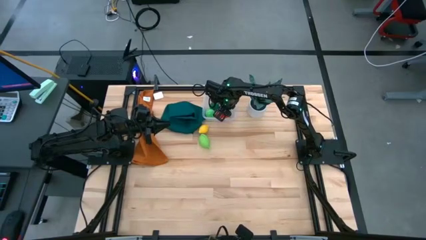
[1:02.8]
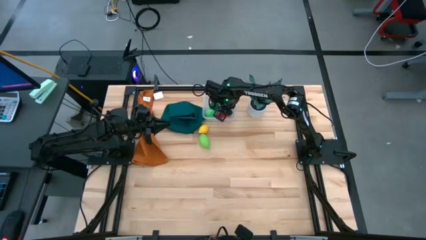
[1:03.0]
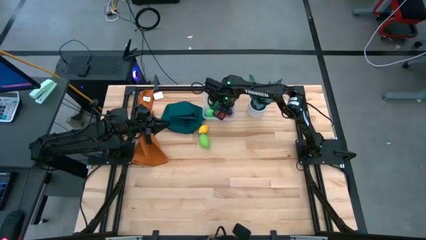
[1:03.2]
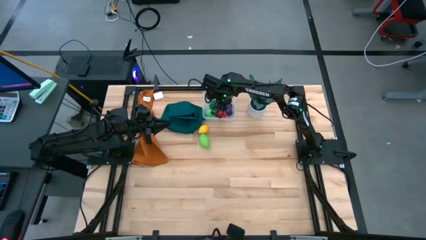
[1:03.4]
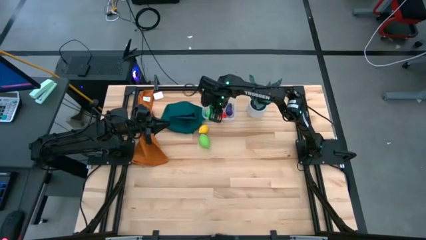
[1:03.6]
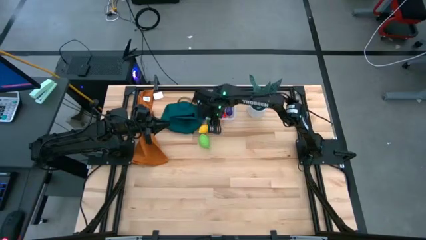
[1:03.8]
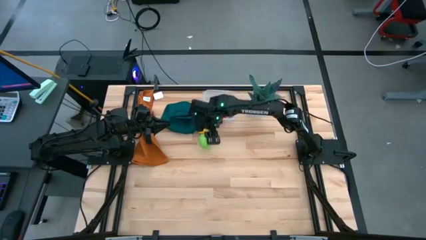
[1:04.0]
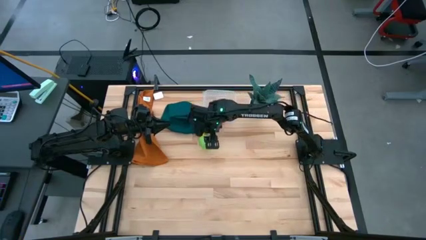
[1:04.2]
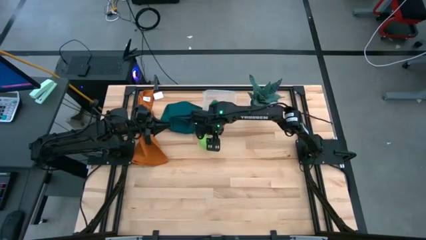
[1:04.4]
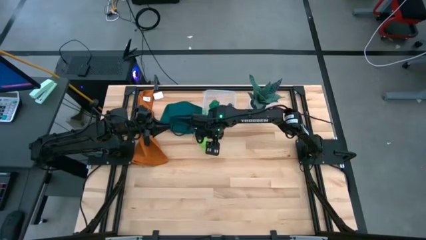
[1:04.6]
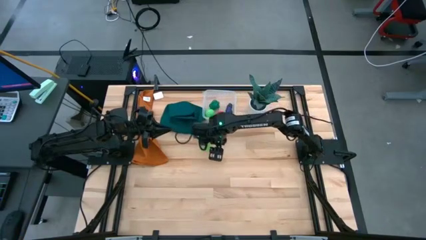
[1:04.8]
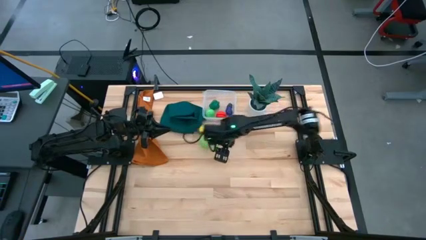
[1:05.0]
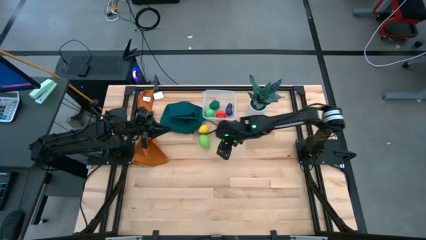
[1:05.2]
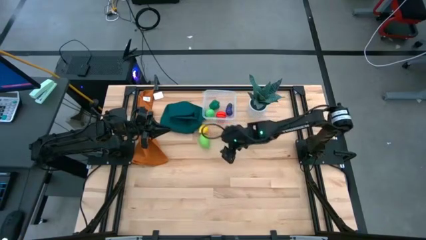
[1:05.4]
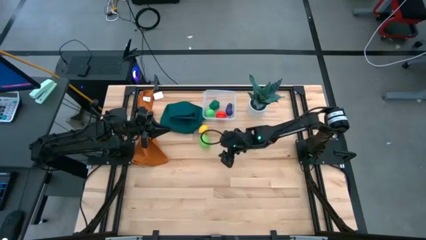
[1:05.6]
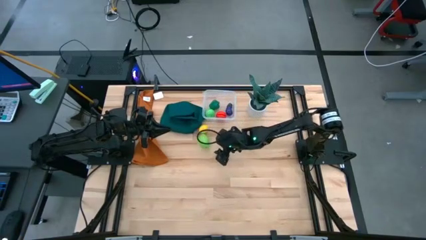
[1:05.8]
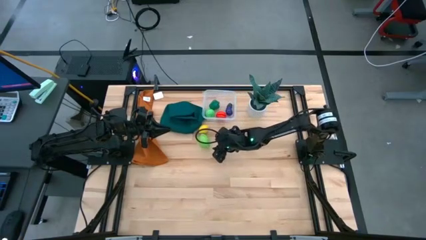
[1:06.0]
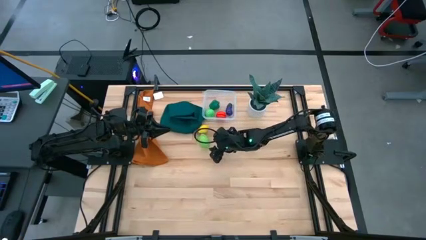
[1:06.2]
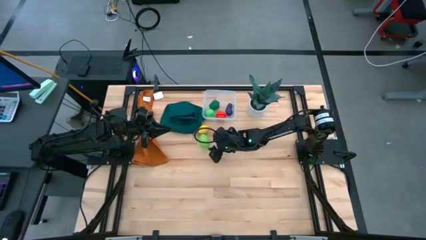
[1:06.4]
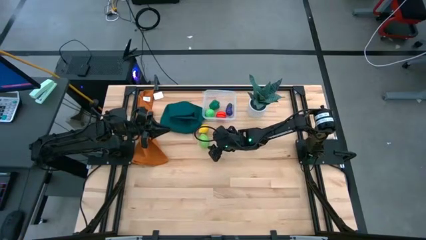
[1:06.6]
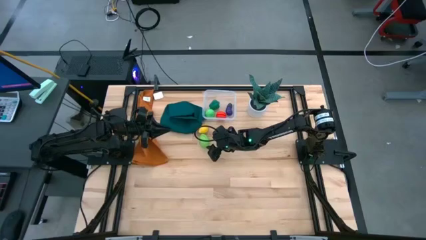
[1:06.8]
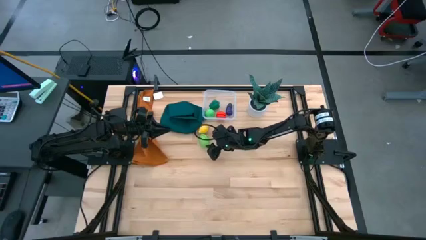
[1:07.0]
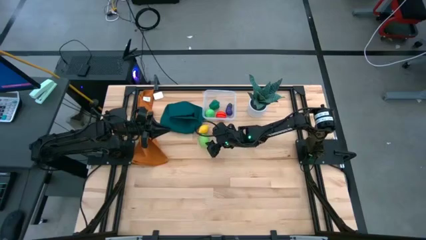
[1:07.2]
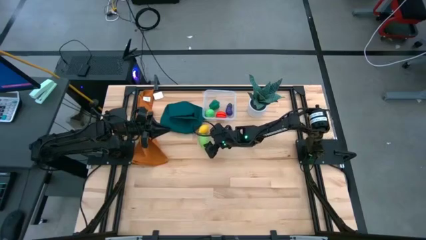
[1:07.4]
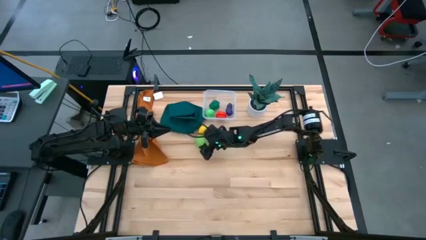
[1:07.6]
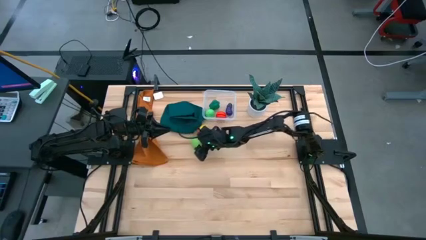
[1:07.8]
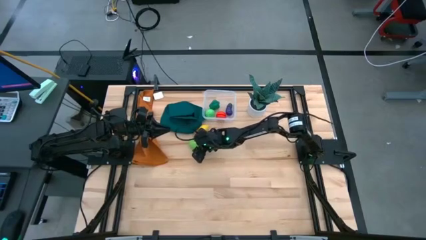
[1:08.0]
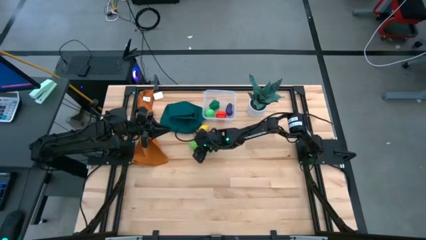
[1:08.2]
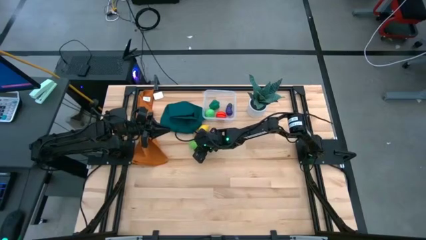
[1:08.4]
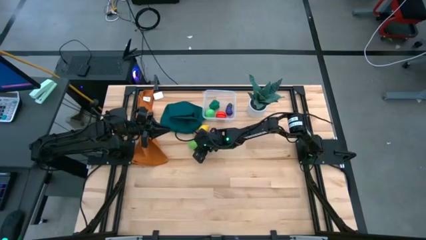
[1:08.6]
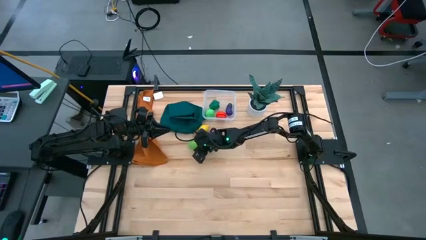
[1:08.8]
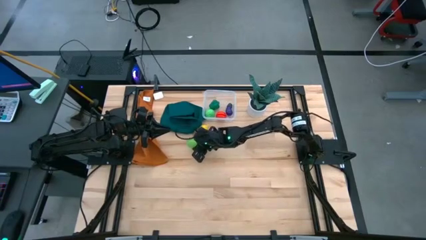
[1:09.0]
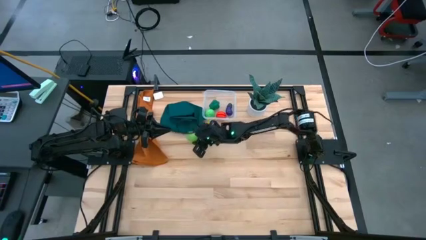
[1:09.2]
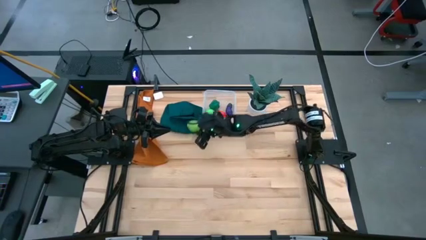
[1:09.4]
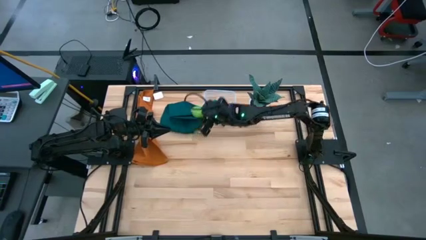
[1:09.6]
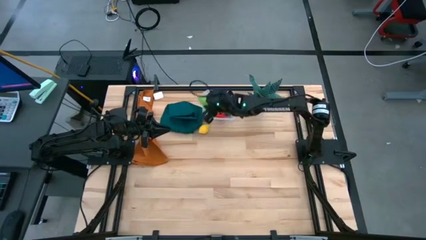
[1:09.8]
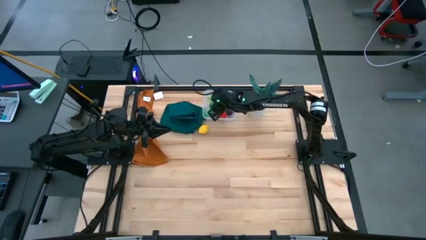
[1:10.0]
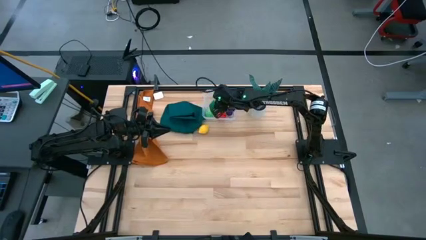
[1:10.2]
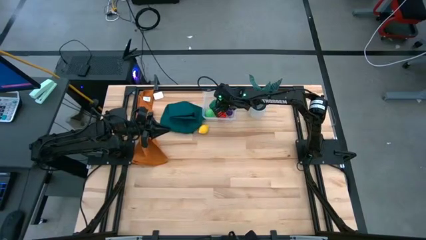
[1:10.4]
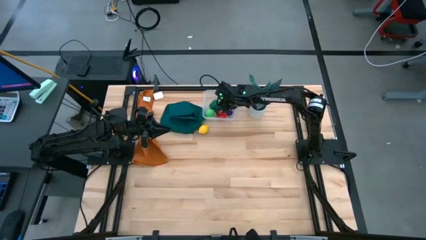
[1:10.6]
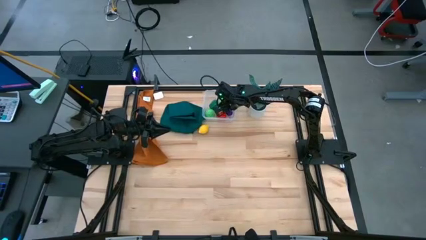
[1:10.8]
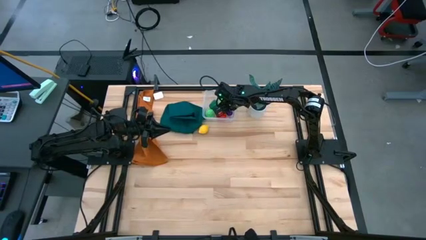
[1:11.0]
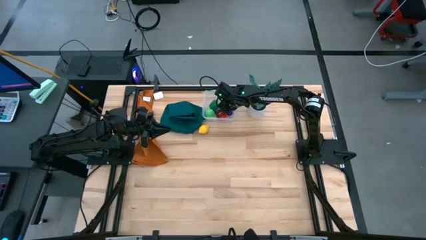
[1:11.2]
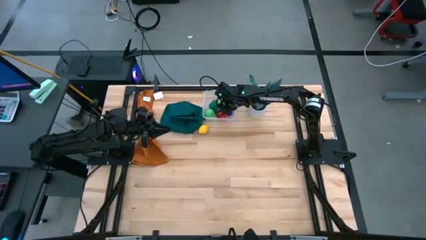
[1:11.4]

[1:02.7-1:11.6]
Task: Pick and placing Produce into tupperware
Put the green melon into the transparent bin

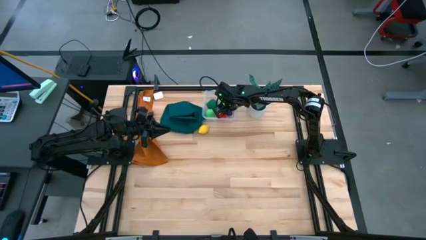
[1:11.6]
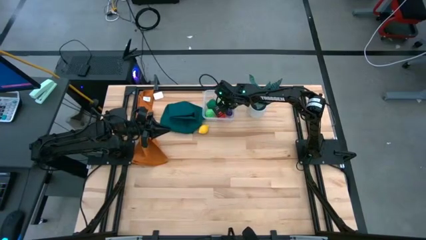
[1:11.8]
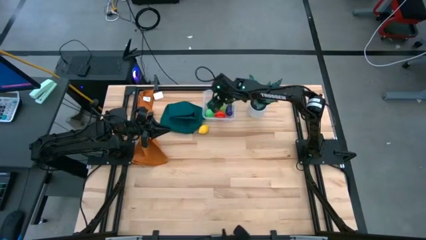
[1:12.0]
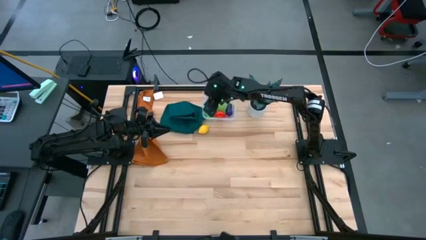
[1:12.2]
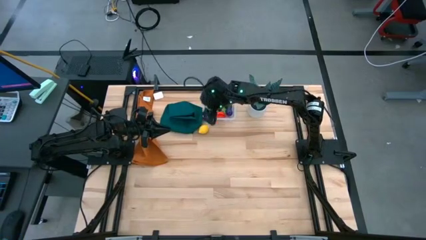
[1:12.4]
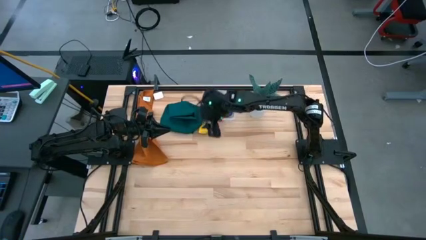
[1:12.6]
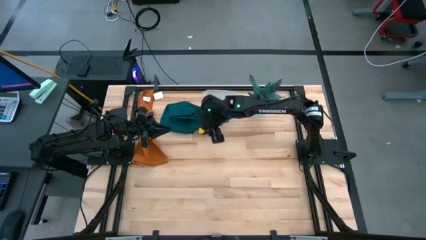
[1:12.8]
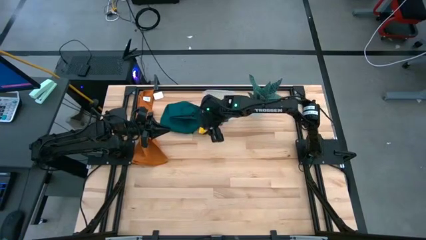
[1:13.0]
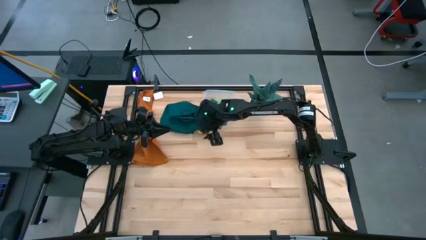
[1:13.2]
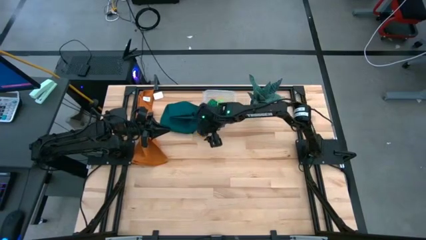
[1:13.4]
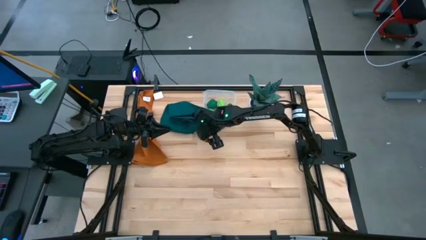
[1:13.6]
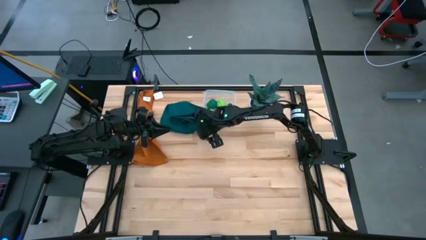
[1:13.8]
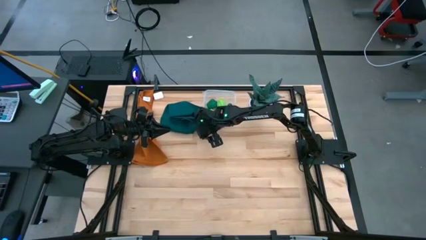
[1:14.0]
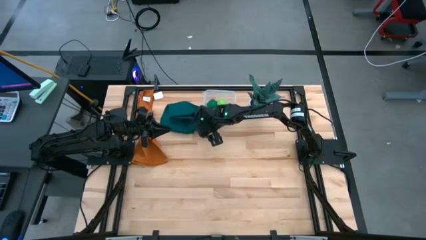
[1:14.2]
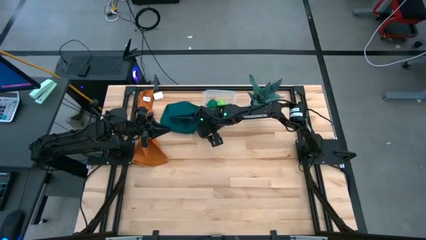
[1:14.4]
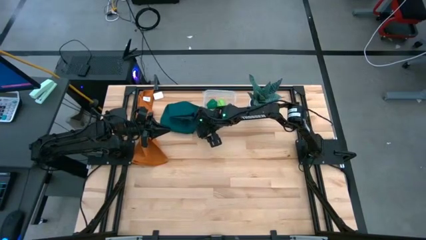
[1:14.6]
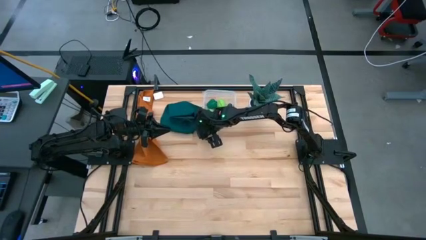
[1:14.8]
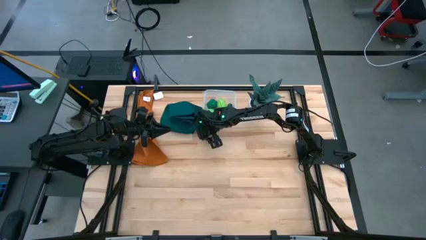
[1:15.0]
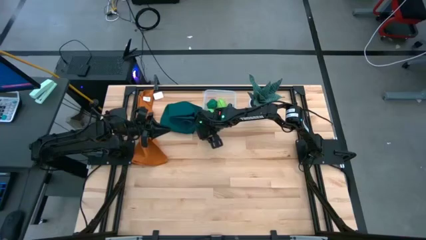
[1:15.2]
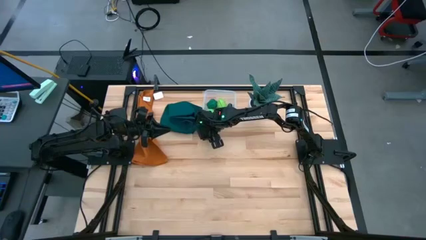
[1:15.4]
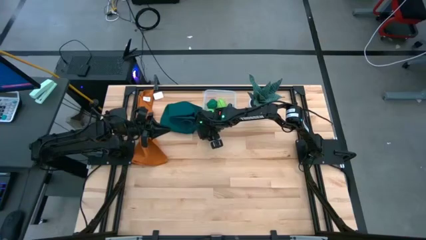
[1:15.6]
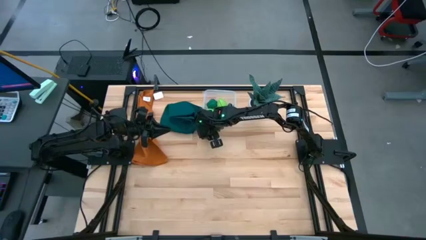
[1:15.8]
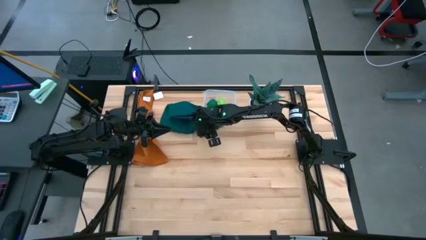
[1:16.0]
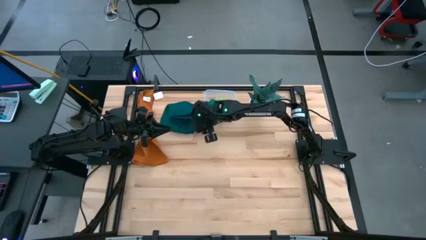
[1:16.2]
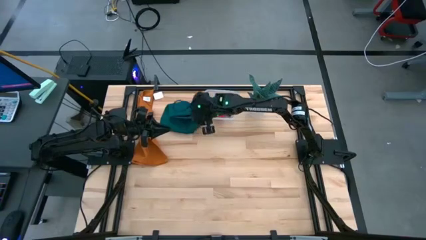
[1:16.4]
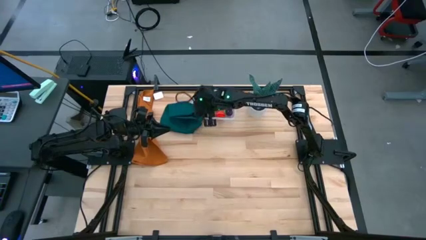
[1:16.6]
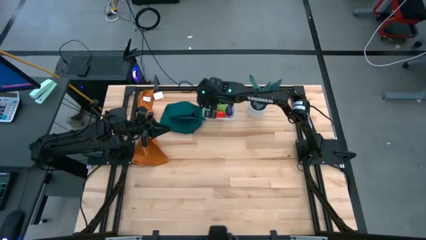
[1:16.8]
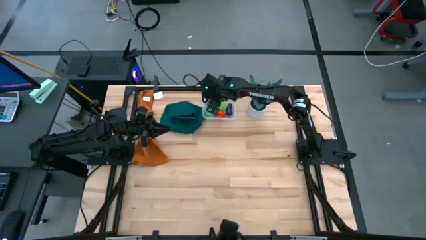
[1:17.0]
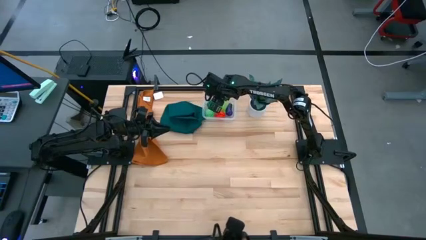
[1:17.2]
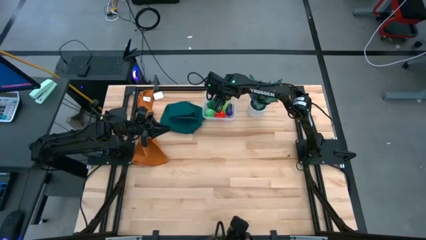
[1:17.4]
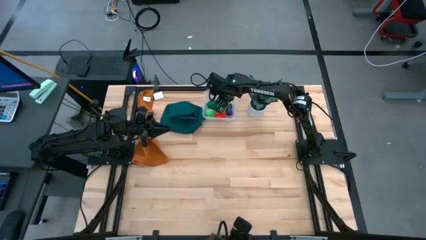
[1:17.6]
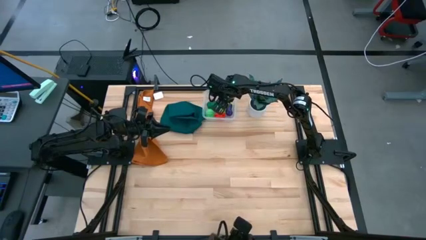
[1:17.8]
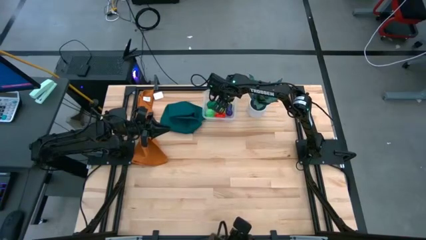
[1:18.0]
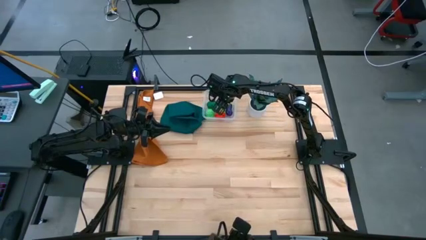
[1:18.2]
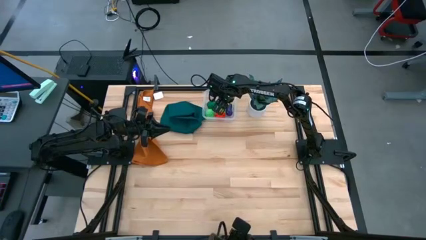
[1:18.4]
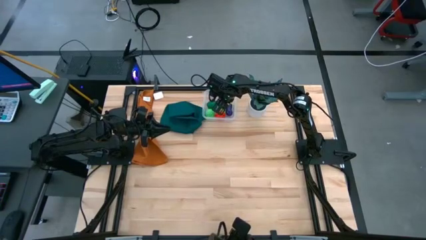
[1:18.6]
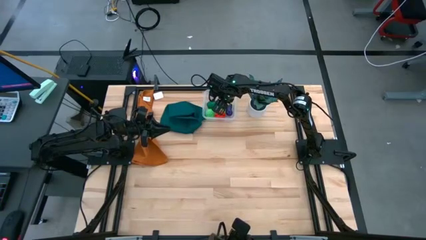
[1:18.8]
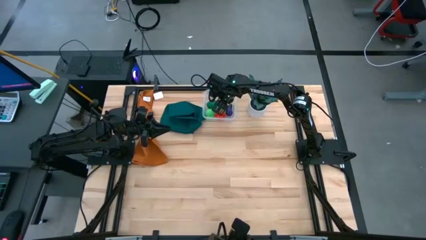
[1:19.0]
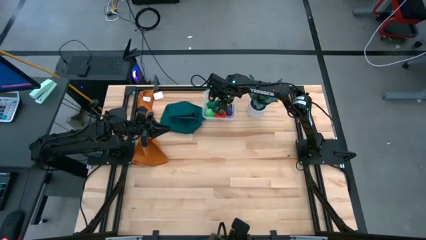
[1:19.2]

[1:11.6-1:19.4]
Put the yellow lemon into the transparent bin
